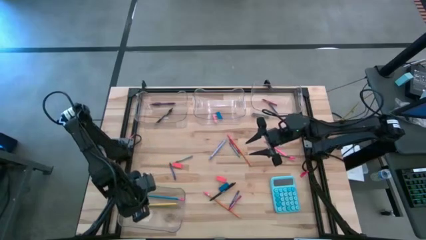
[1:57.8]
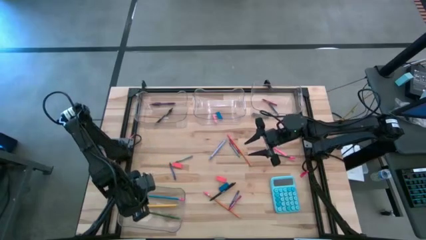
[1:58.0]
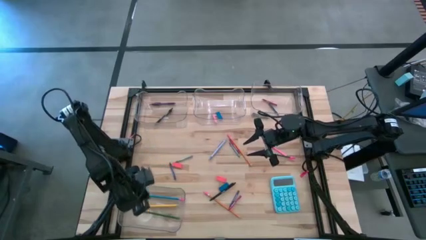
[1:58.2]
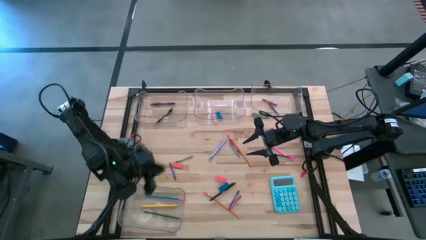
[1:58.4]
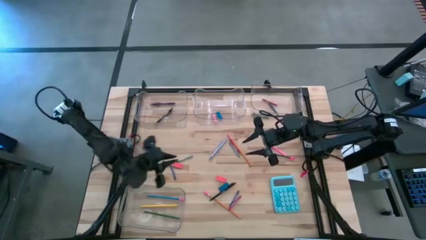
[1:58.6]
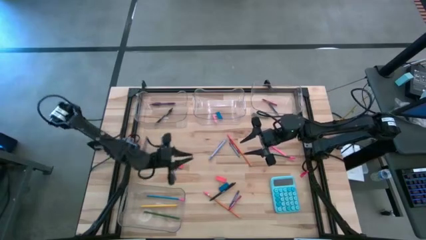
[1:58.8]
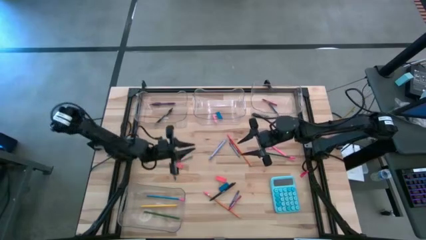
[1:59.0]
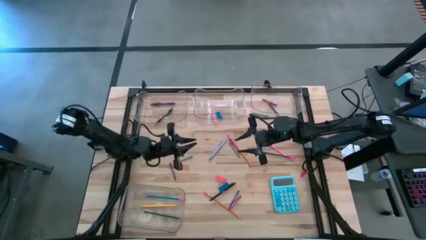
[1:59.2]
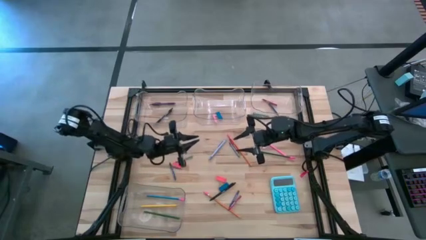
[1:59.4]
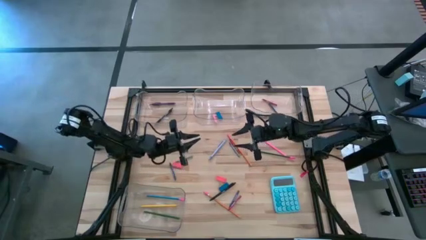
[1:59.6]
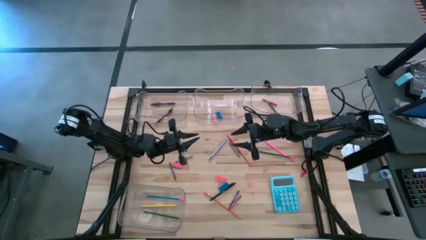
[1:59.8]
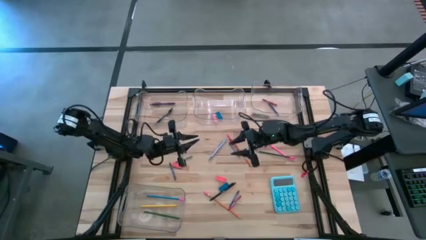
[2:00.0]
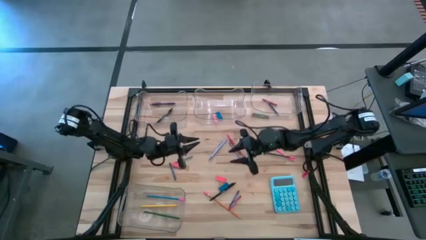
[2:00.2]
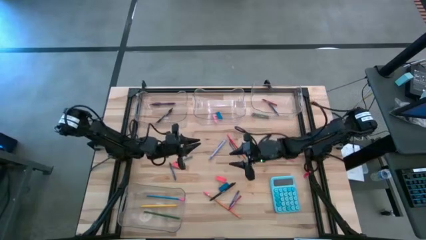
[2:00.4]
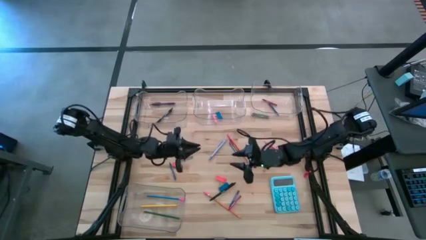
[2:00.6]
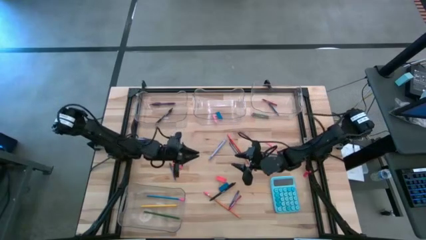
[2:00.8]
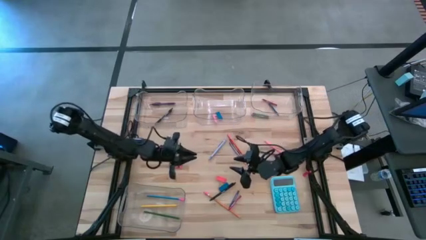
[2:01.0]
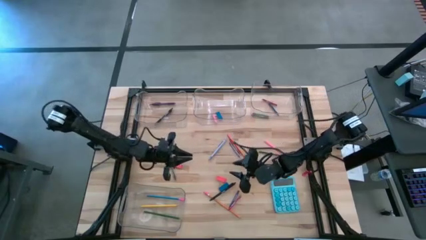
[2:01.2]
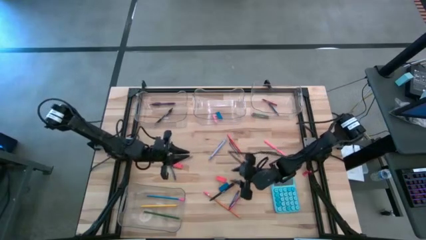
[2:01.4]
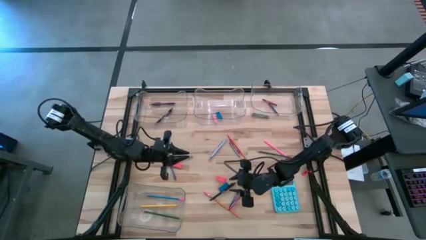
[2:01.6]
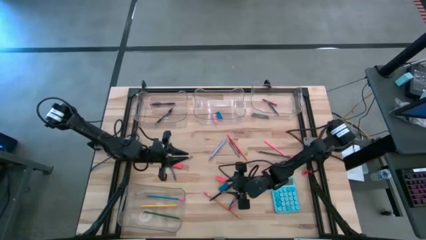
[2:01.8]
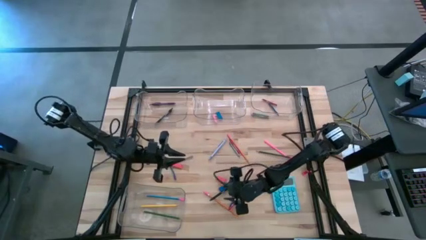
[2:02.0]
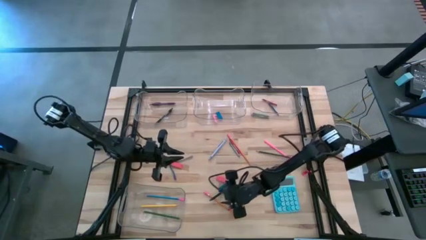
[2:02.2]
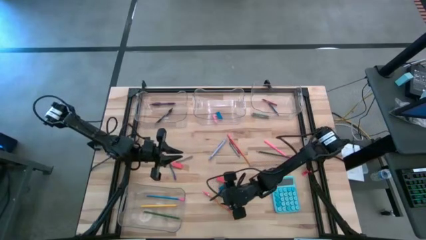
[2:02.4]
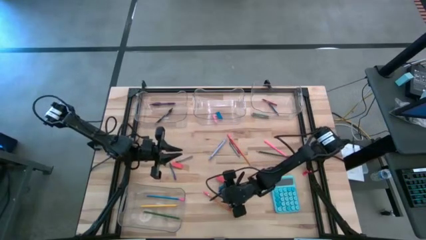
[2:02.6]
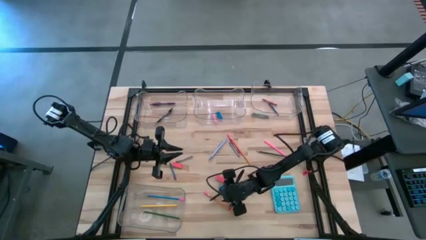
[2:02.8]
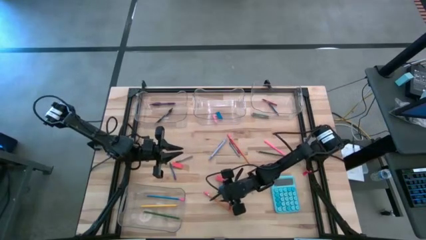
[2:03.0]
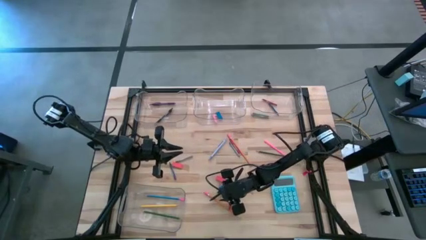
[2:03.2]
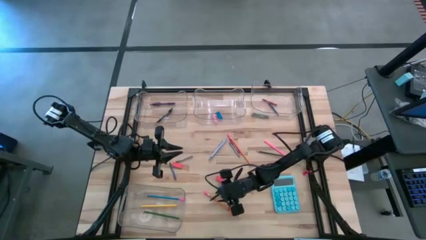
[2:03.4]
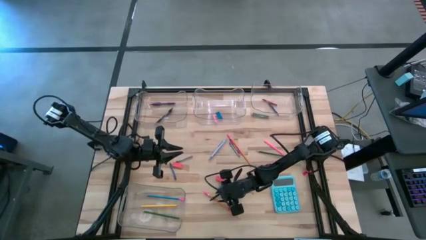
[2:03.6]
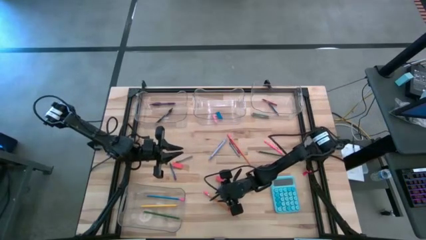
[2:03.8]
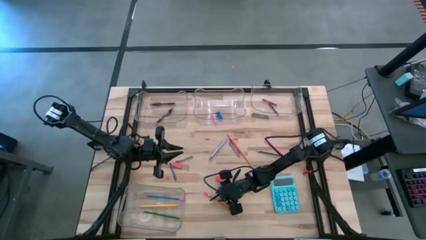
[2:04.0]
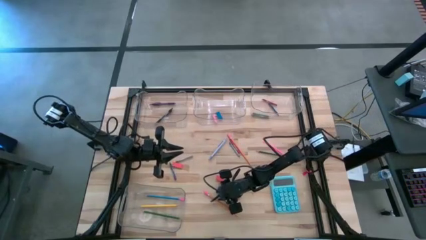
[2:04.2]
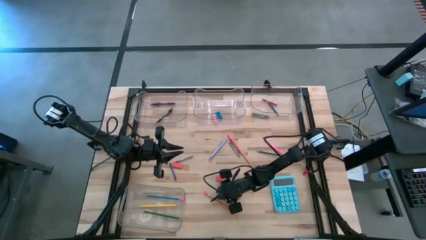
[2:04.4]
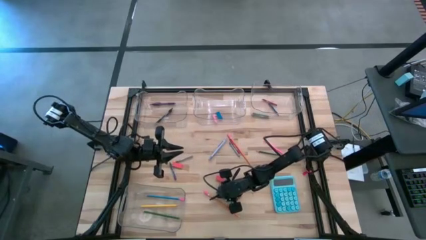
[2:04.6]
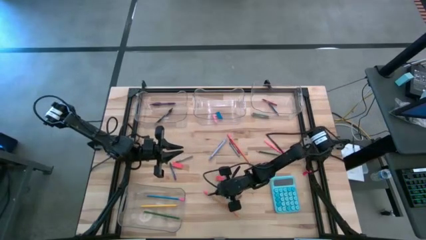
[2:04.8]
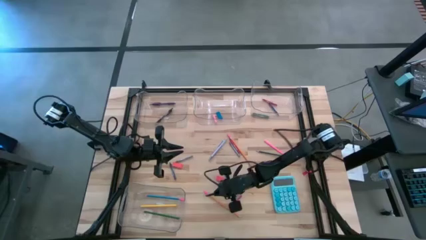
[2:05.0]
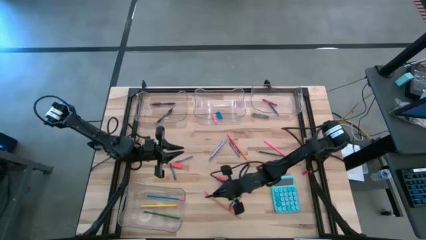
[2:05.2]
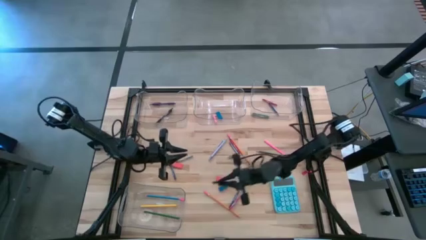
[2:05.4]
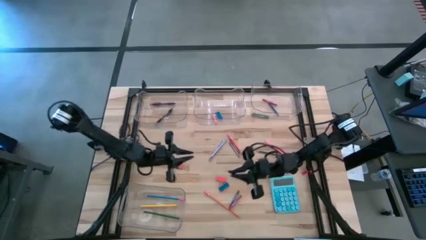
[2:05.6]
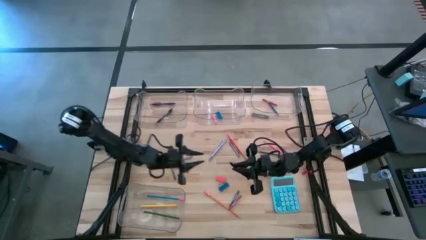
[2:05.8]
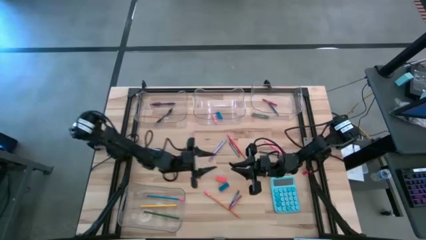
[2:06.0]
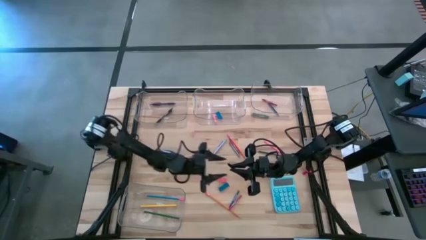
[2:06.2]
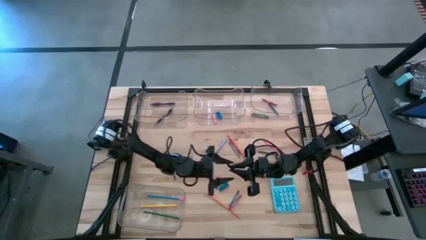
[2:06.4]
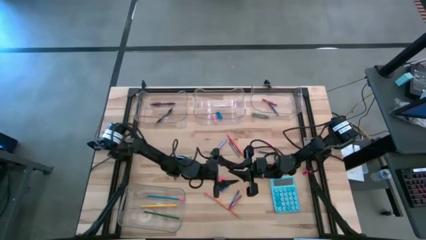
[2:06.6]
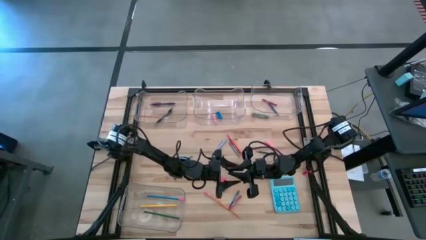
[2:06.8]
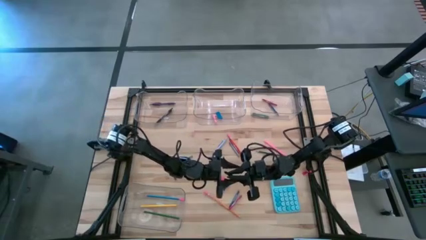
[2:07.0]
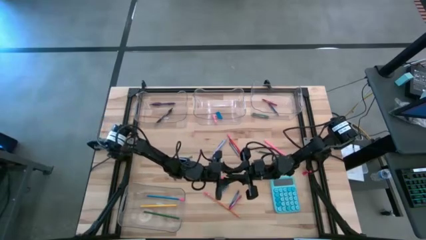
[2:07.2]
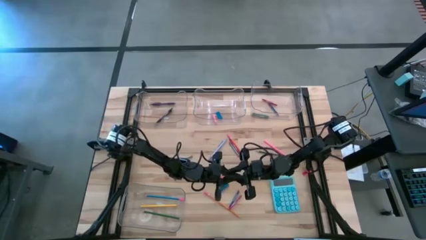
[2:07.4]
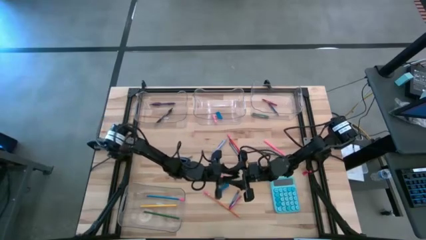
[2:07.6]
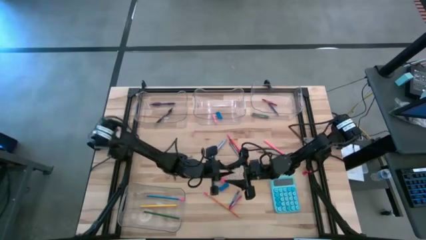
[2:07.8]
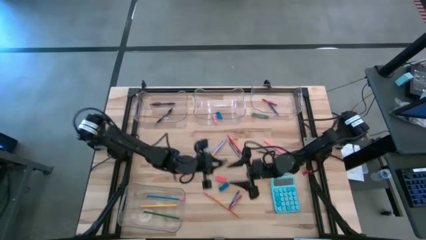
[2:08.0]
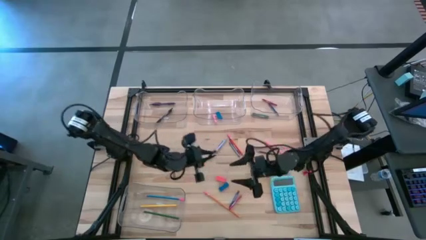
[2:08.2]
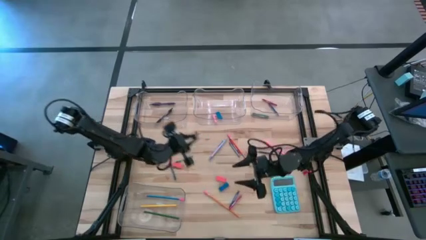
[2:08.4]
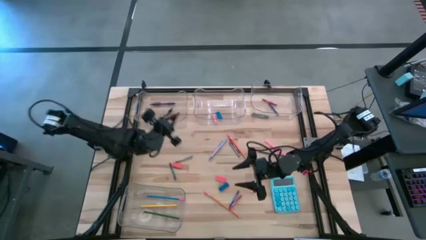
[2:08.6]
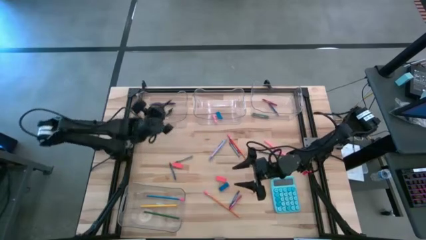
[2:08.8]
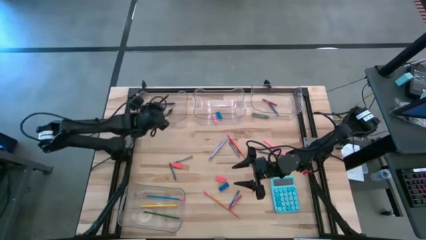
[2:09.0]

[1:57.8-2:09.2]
Task: Sort crayons/erasers/pens/pencils in bins
Put the black ballpen into the top left transparent bin

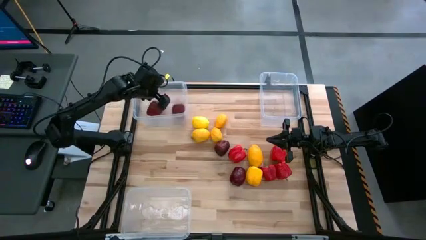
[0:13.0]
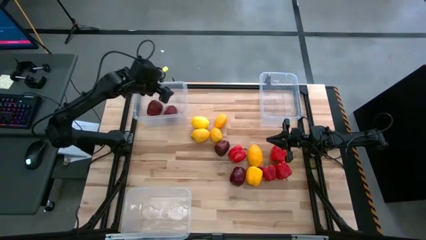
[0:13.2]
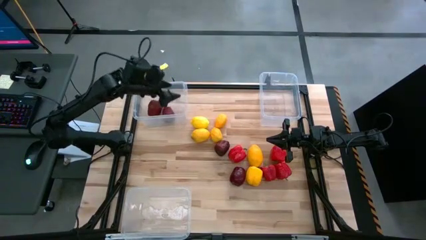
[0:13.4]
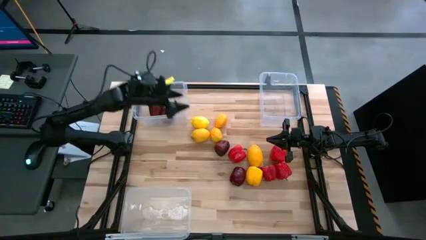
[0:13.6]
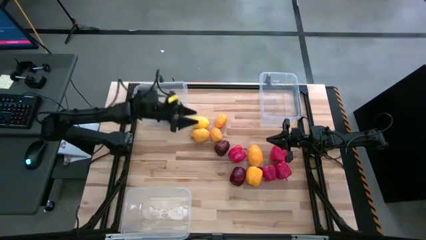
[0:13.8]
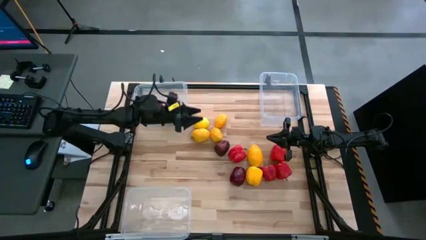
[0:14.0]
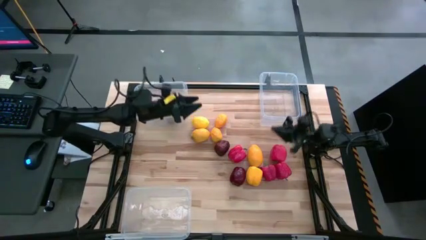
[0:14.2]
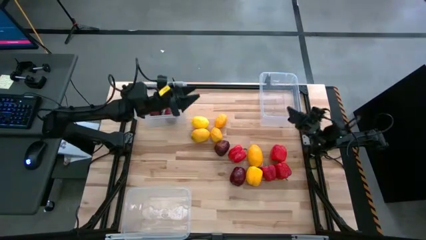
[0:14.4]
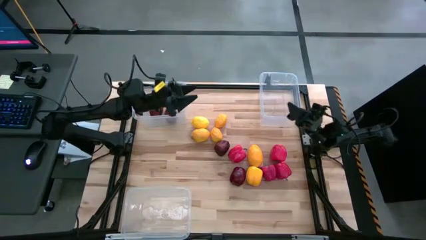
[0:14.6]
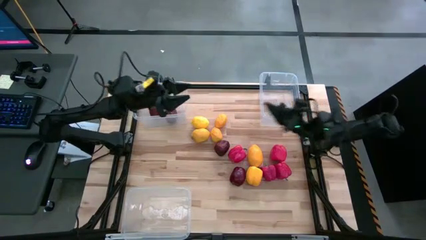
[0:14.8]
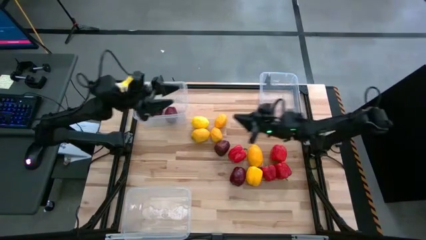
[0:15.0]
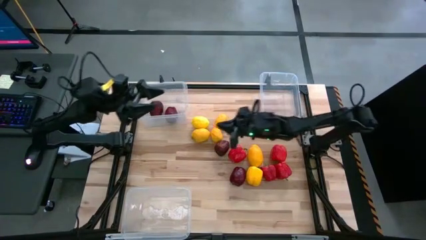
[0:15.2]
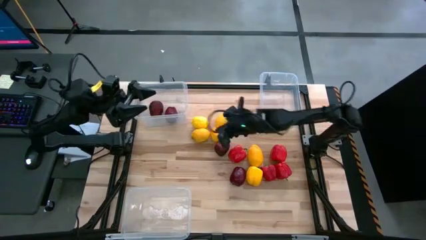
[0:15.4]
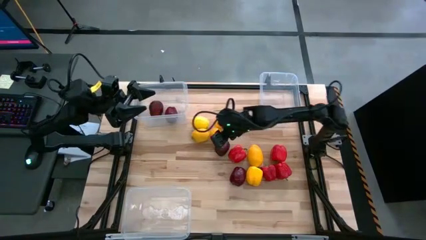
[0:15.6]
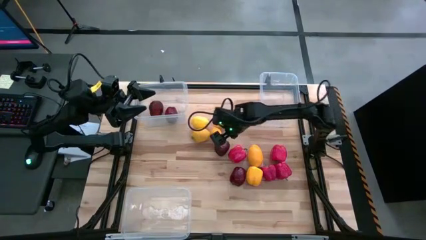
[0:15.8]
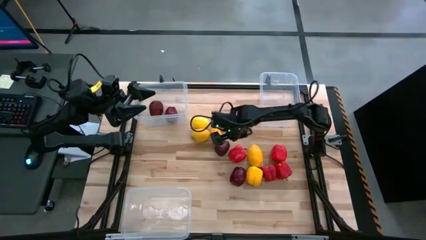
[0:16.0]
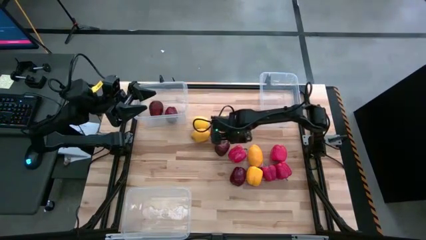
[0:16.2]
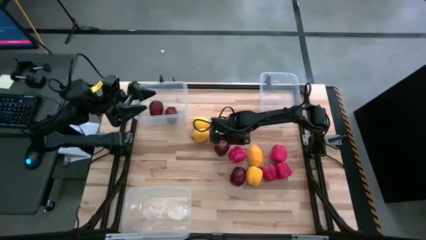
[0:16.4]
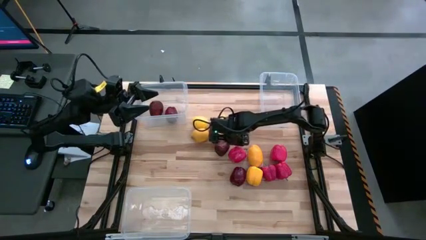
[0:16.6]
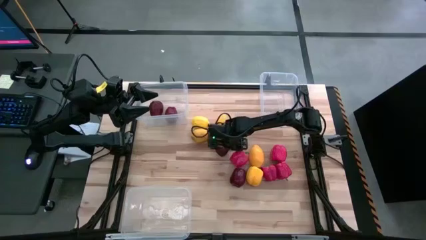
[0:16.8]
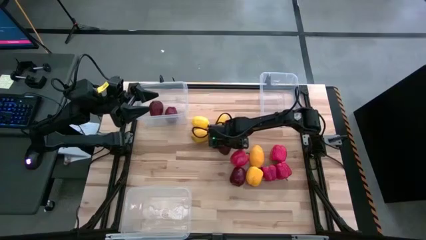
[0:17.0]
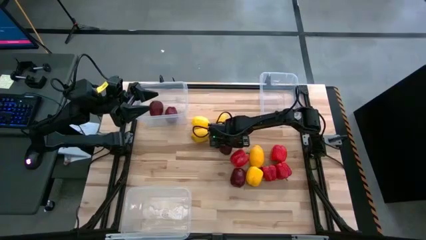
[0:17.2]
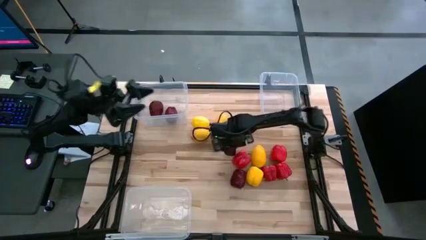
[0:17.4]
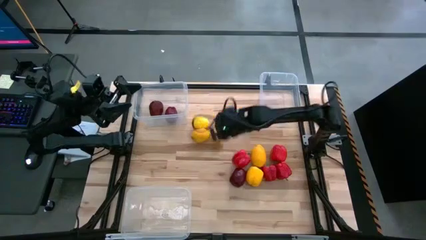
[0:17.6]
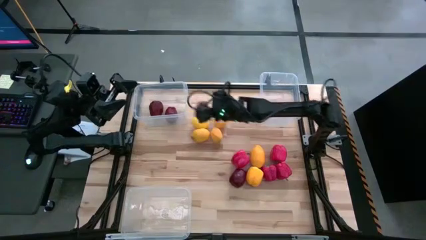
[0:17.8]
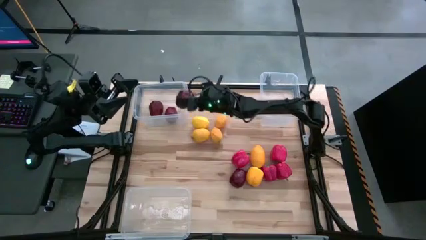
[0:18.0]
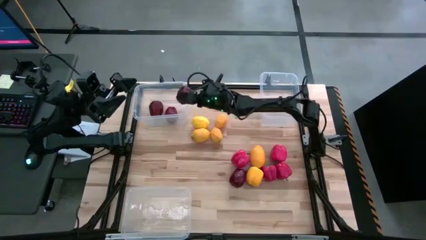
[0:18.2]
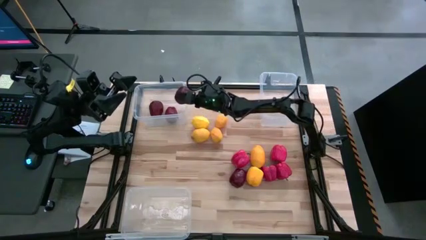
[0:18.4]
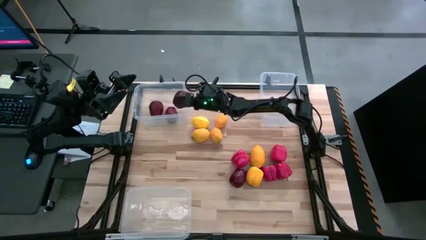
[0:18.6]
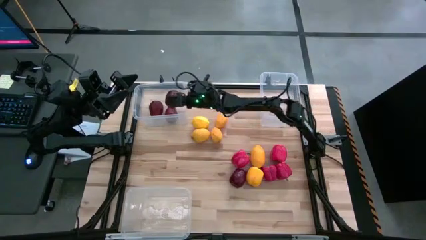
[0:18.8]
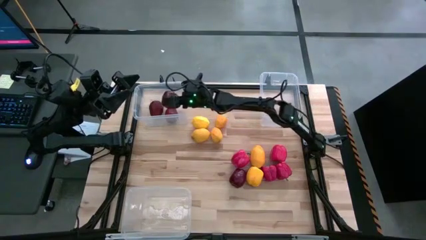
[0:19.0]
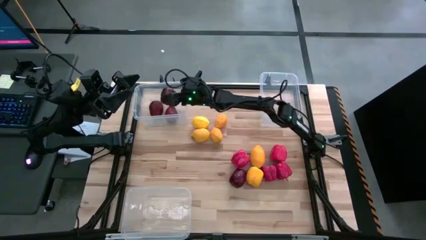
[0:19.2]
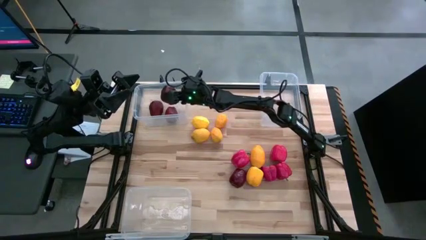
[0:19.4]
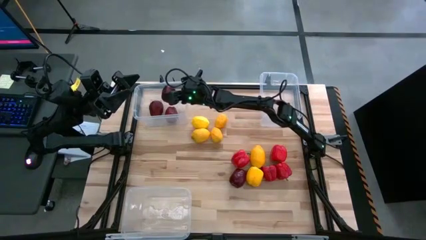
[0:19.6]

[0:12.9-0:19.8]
Task: Sort produce into baskets
Put the red apple into the top-left transparent bin
